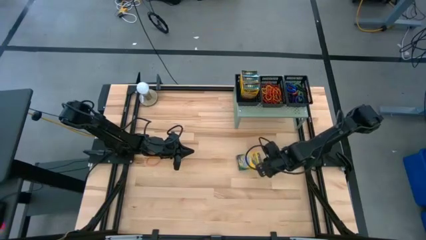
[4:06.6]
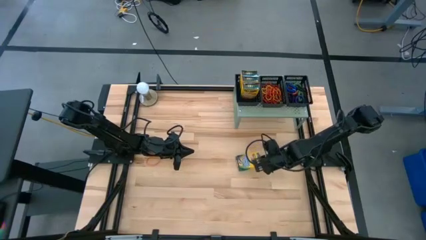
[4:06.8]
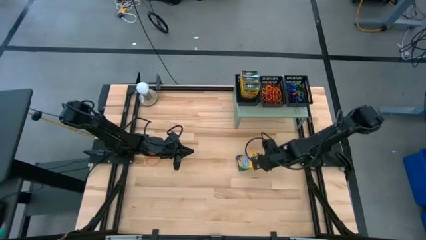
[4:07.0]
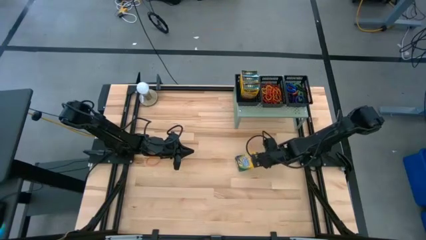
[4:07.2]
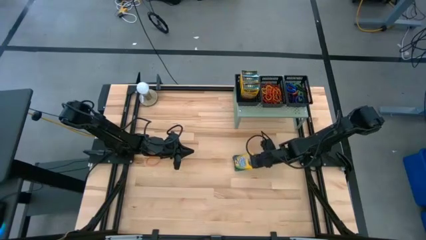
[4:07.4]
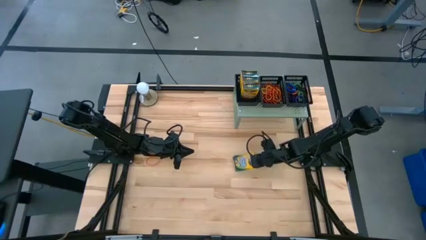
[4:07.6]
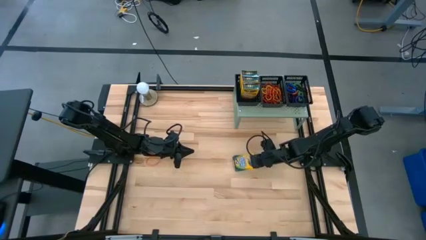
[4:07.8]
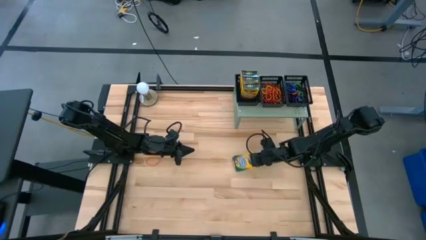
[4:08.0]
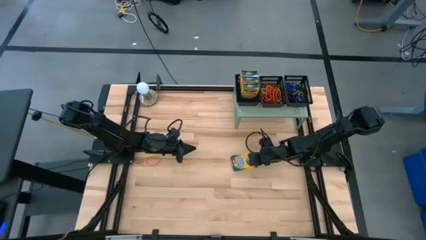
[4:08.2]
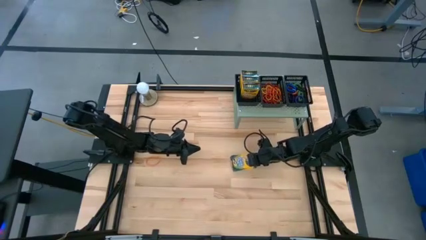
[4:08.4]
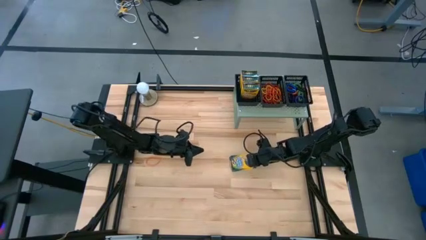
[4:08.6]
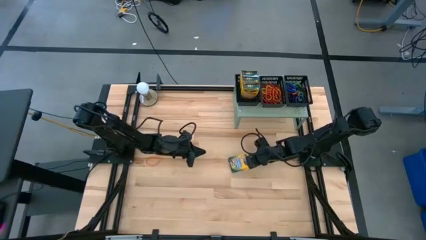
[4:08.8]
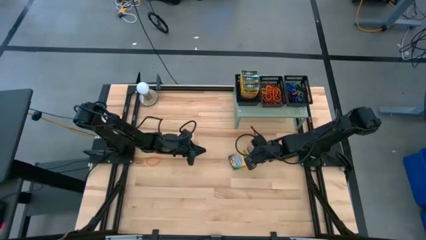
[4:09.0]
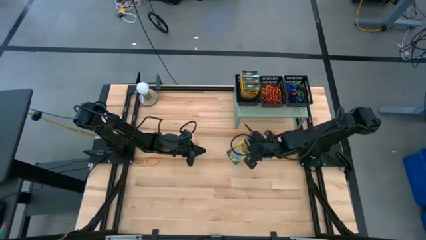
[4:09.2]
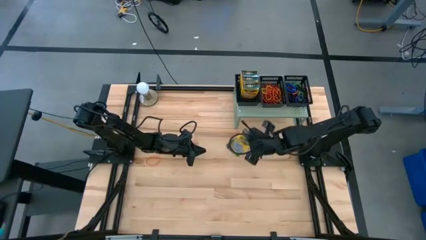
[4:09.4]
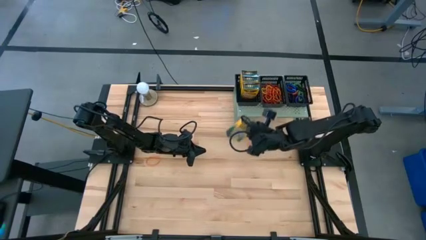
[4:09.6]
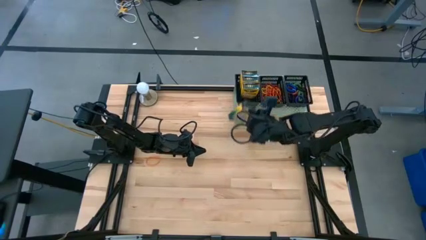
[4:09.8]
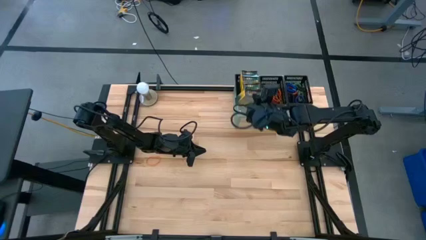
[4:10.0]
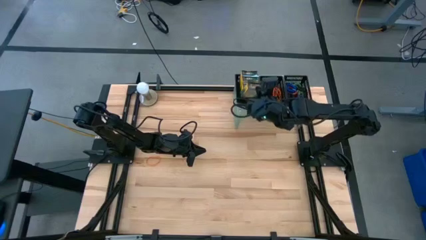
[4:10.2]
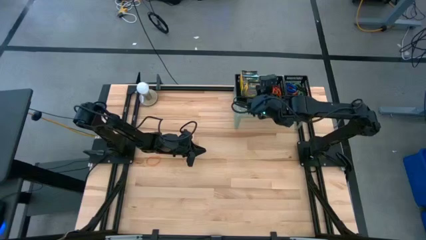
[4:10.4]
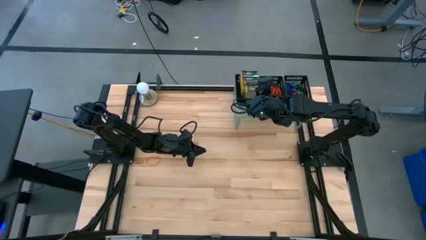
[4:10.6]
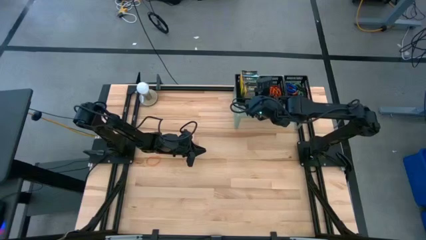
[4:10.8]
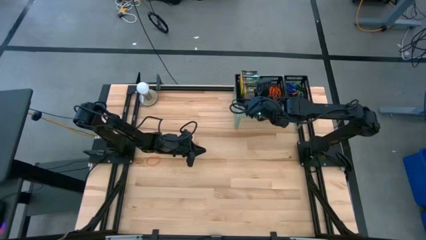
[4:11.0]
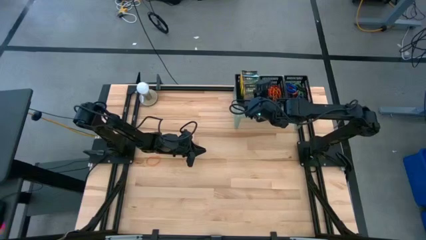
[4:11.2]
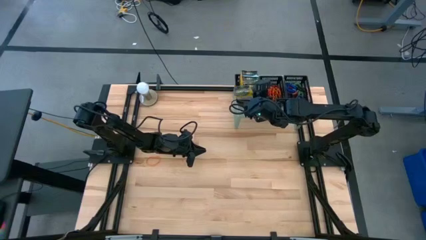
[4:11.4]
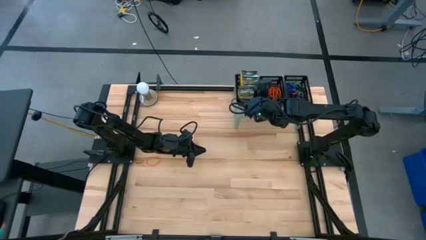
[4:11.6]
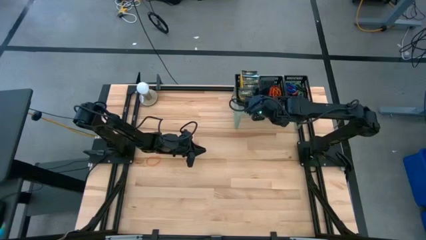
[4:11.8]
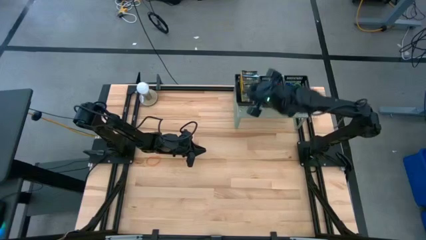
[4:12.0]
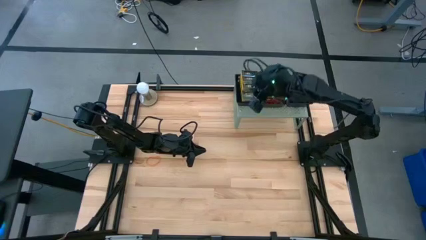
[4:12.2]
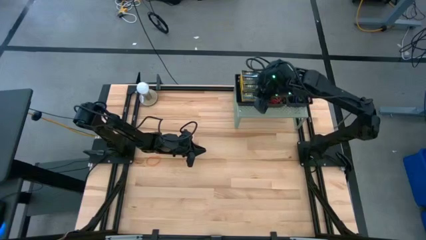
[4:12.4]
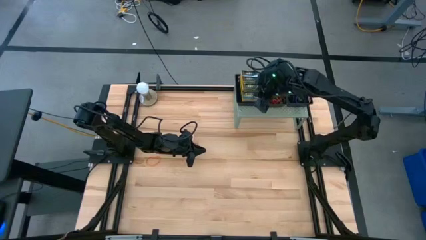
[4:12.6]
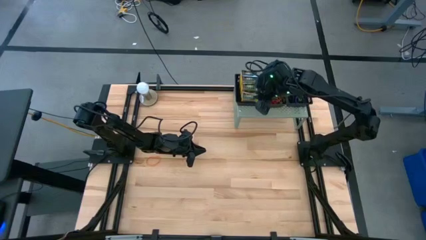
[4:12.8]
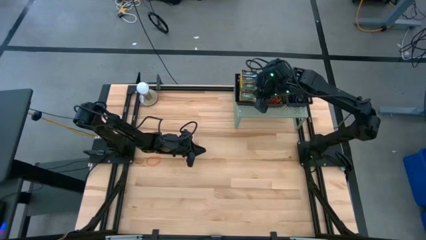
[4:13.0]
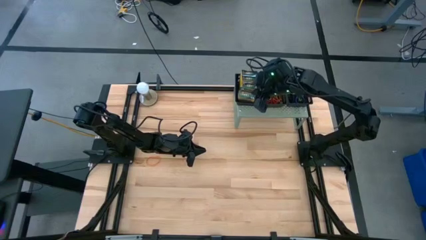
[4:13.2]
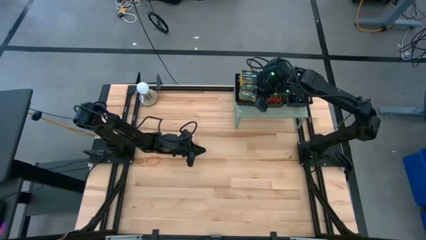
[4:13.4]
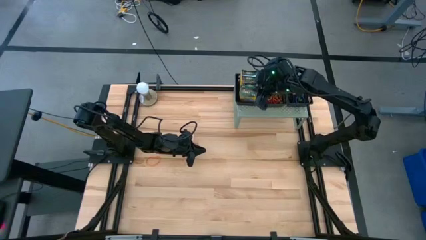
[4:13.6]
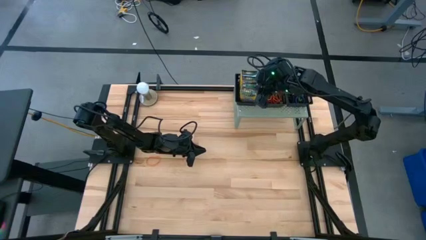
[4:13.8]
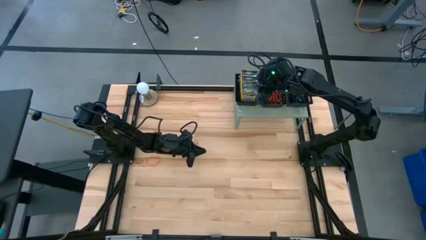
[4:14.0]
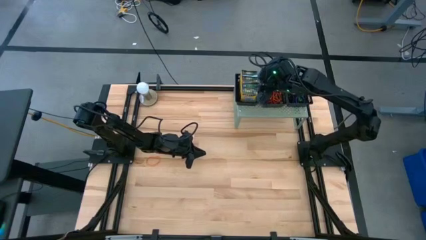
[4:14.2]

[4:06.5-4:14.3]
Task: Pick & Place Office Desk Supplies
Put the yellow crayon box into the left black basket on the shelf

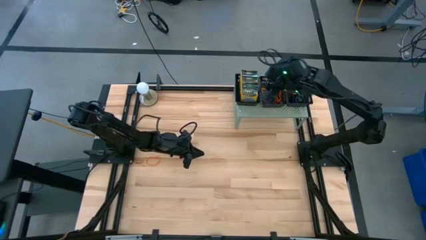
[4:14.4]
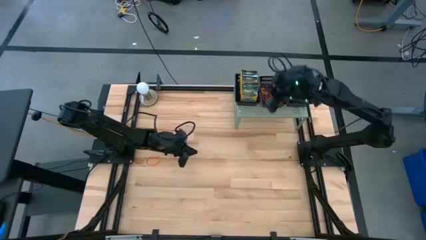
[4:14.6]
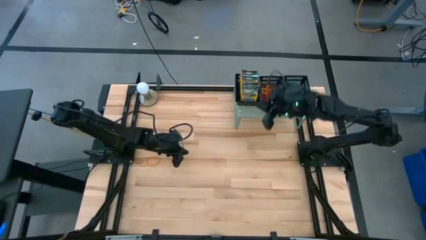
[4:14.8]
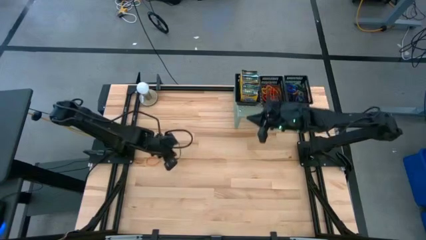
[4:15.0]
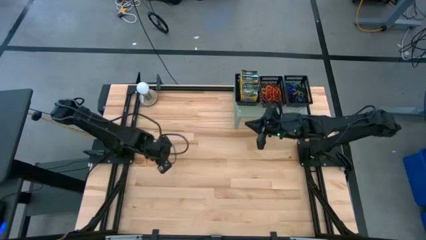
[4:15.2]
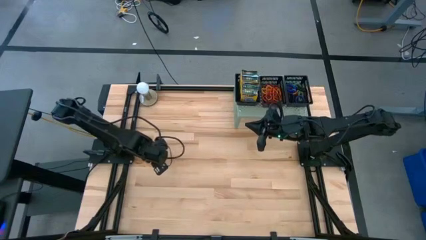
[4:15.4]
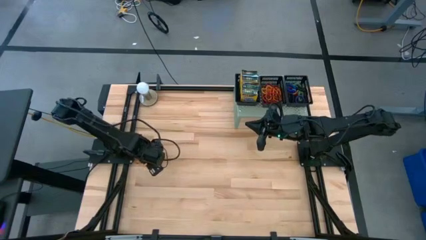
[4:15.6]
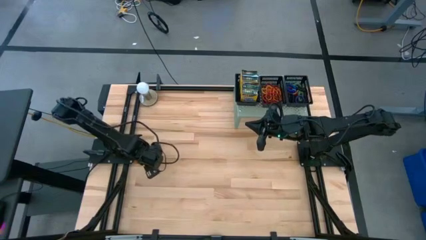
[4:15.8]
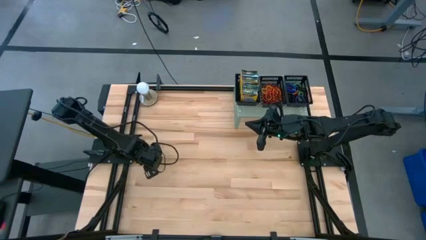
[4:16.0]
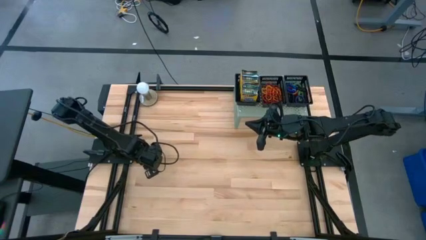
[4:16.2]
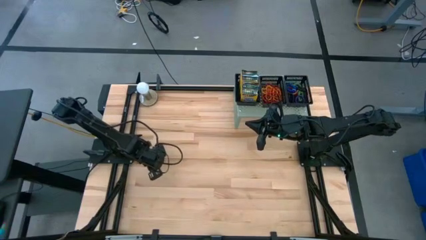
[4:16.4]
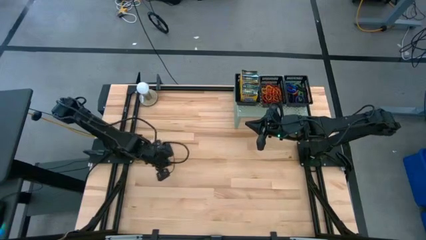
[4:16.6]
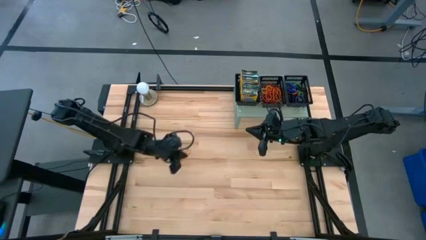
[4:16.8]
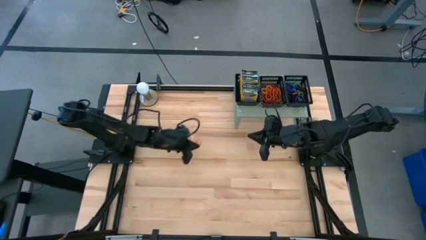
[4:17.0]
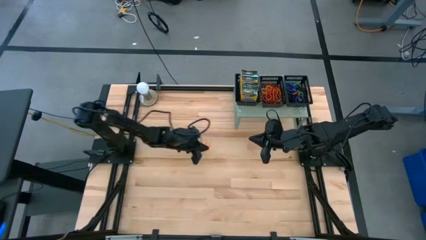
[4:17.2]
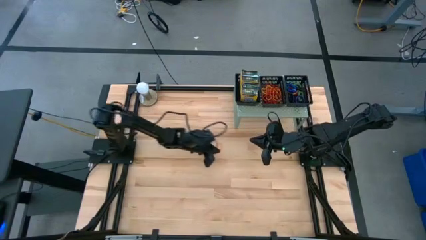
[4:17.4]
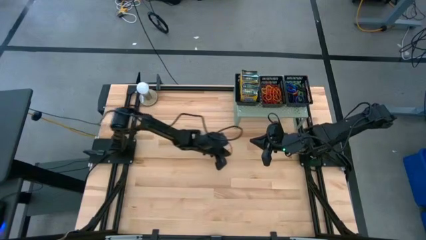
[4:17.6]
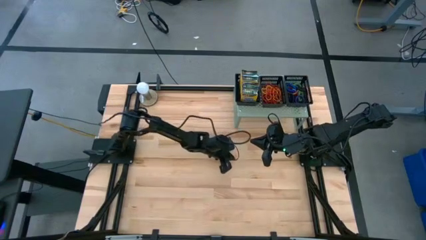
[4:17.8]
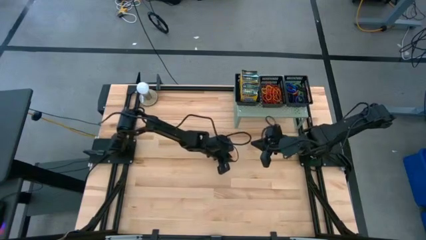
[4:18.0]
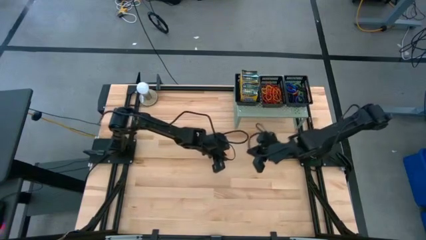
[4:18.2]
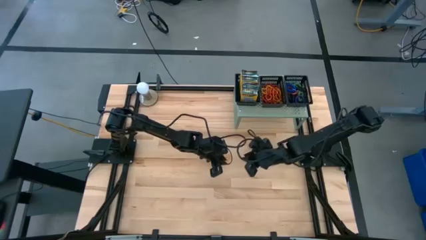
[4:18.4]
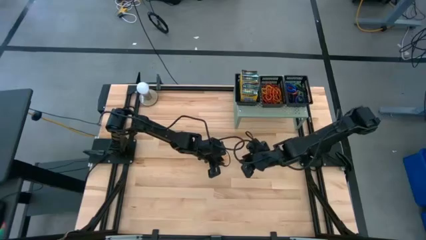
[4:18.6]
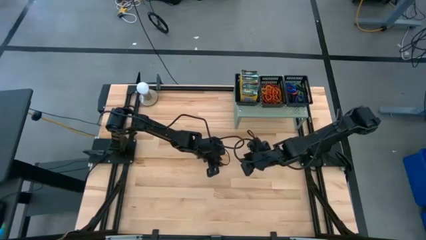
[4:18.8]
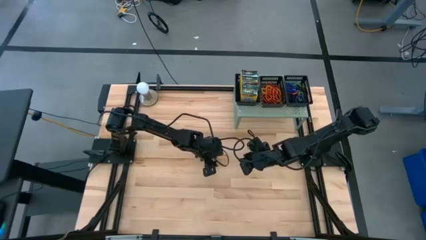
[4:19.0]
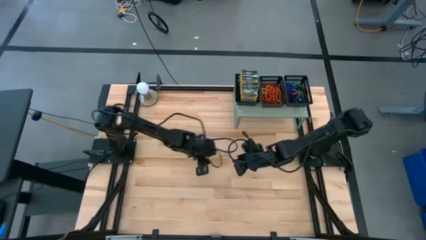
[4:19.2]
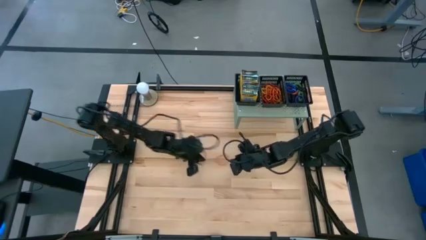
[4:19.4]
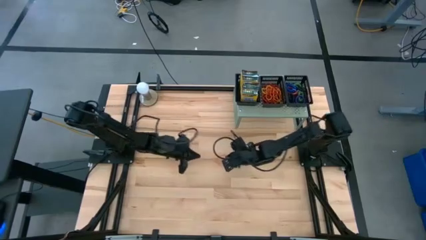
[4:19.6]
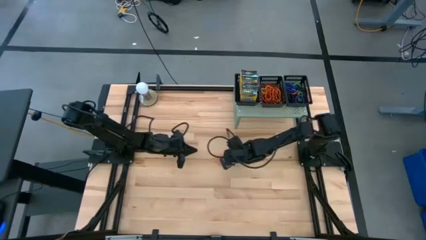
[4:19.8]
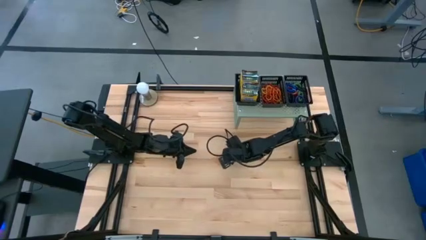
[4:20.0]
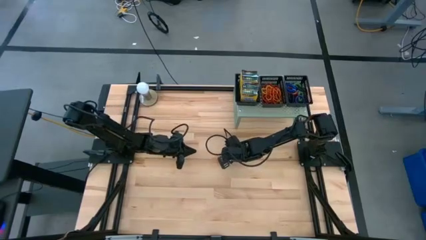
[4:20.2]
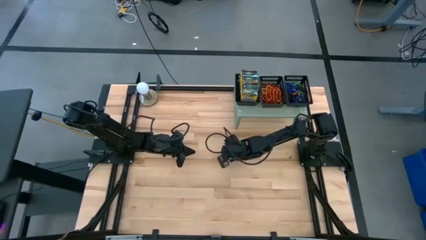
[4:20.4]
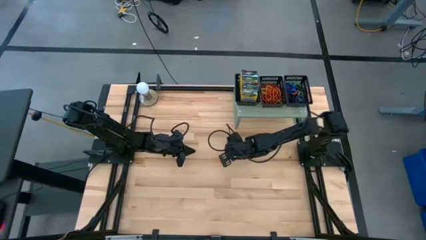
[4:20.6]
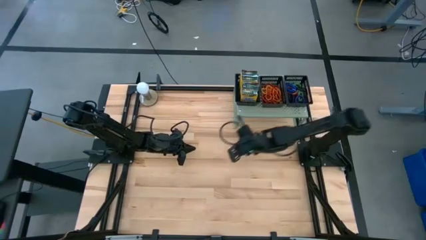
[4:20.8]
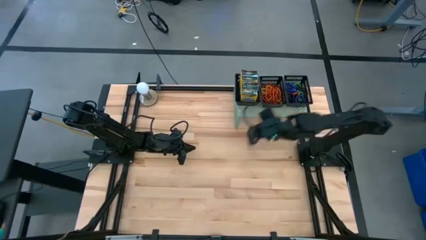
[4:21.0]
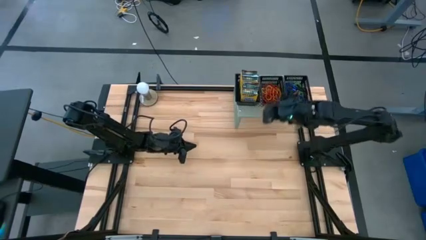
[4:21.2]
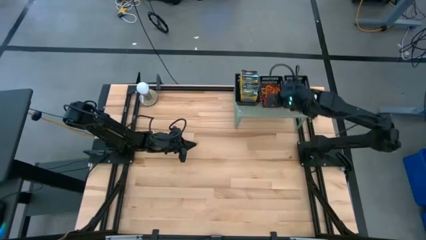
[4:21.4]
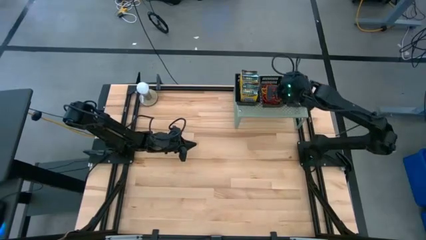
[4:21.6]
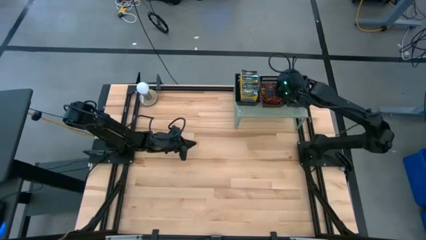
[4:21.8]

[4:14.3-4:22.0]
Put the orange rubber band into the middle black basket on the shelf
